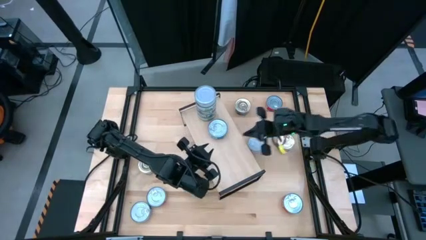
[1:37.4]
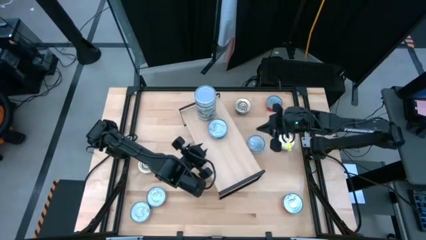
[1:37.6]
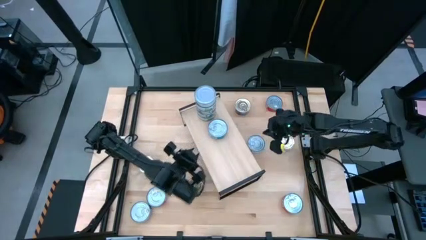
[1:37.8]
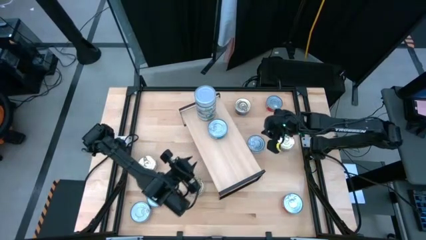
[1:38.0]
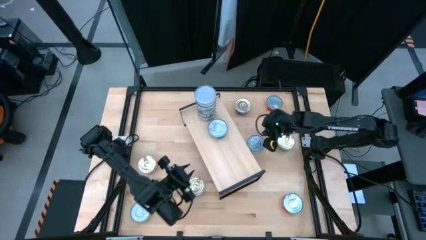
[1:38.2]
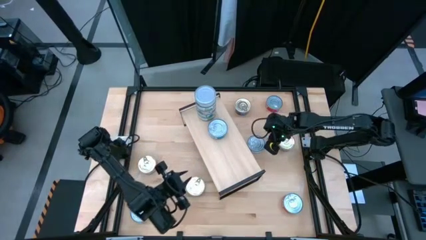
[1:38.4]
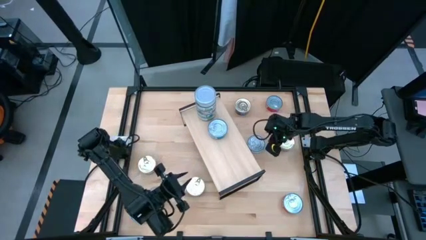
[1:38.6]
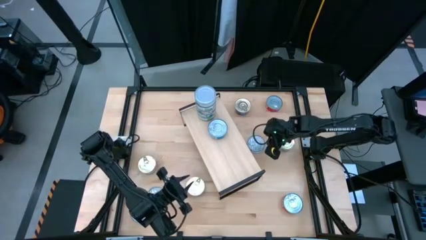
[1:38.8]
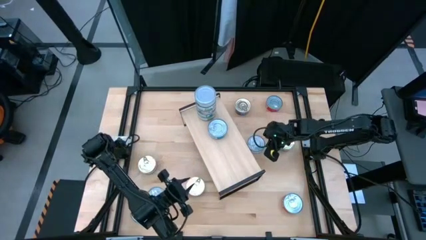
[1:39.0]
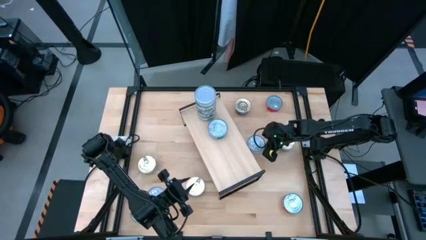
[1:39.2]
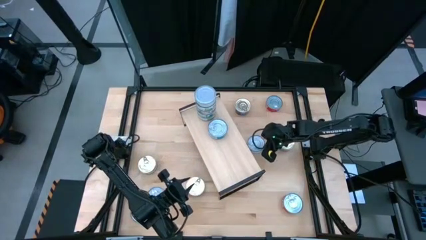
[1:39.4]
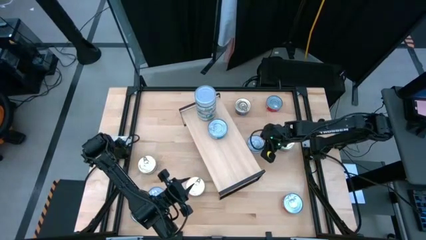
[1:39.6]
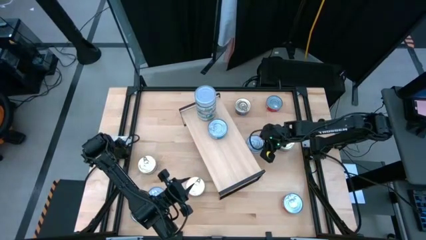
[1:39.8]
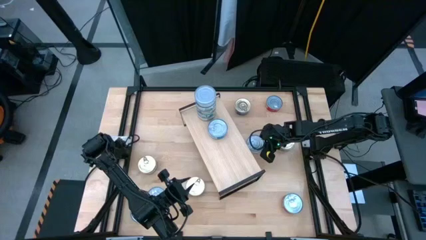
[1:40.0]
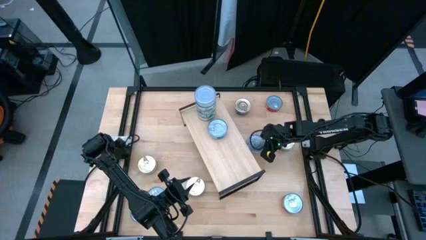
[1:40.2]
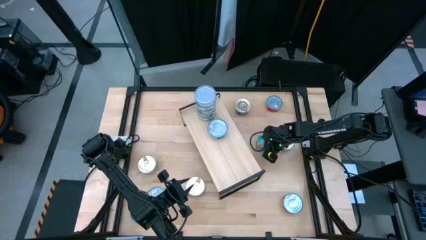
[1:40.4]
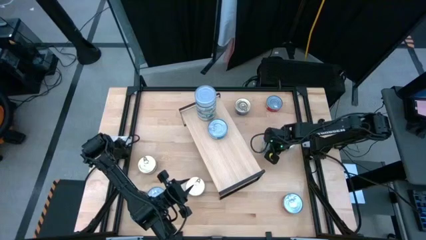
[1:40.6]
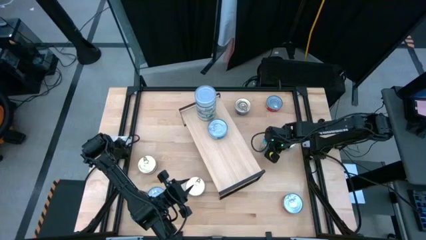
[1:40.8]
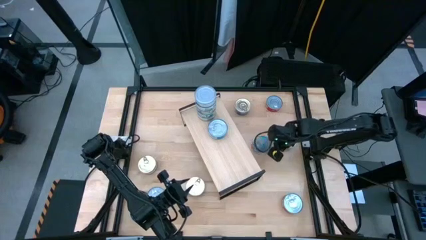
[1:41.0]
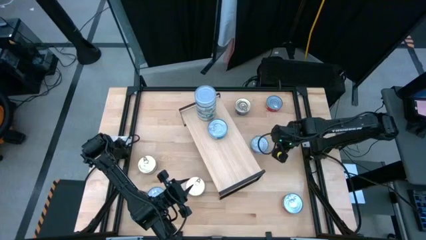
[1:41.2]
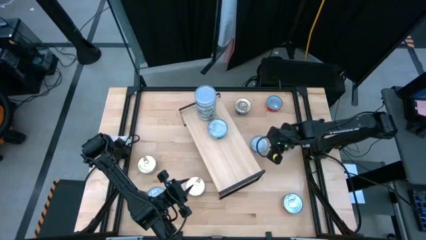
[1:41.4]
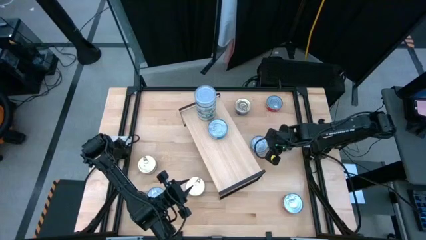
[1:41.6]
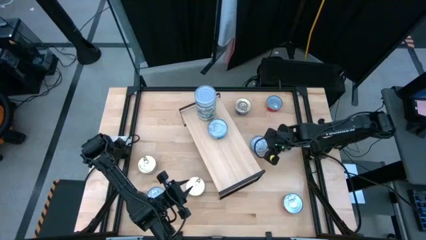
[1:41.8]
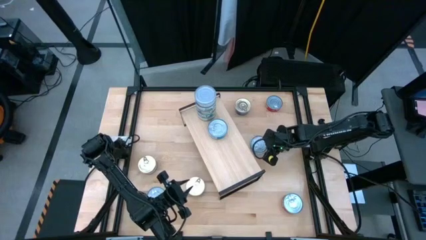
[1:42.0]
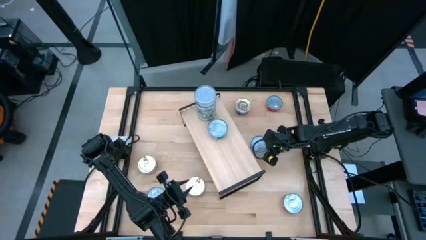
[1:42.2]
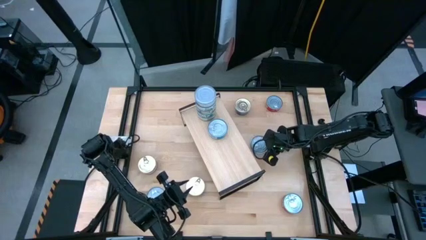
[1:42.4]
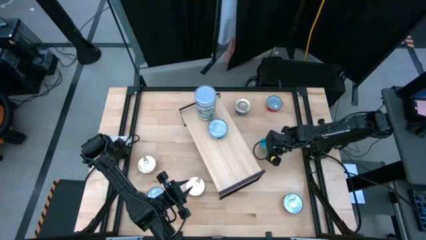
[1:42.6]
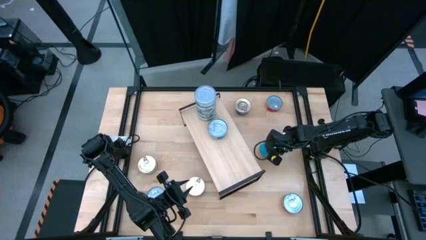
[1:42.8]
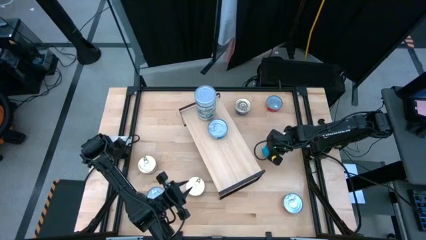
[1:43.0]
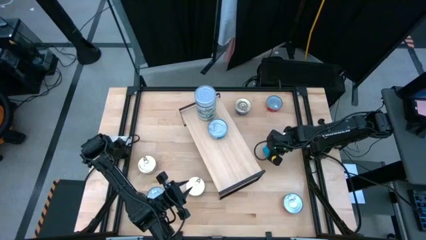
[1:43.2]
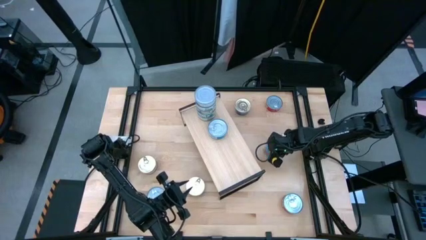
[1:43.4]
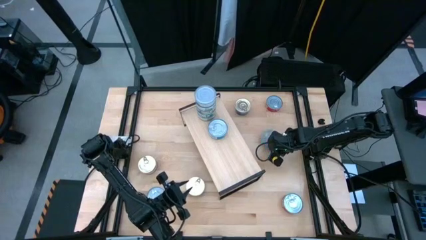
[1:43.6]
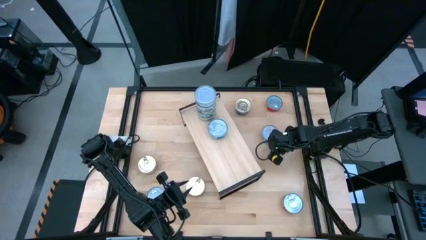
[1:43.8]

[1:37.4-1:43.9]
Task: Stack canned seafood by type on shelf
Stack the top right light blue tuna can on top of the other light blue tuna can the shelf

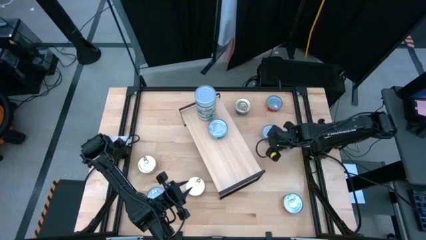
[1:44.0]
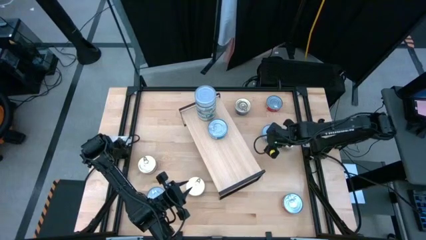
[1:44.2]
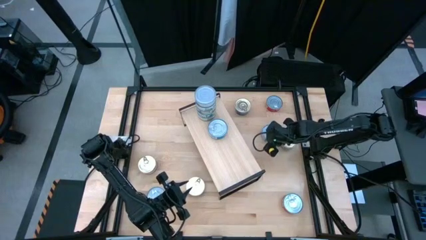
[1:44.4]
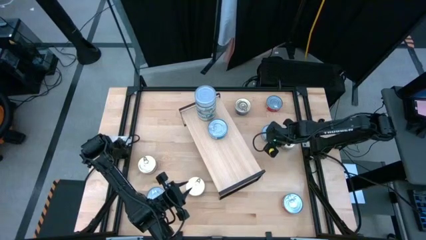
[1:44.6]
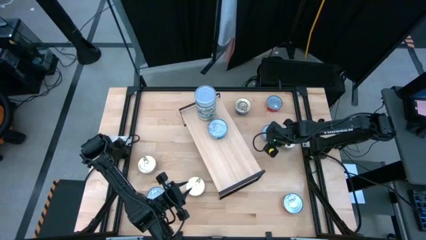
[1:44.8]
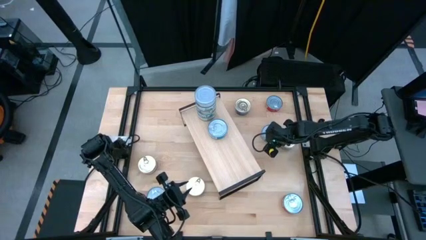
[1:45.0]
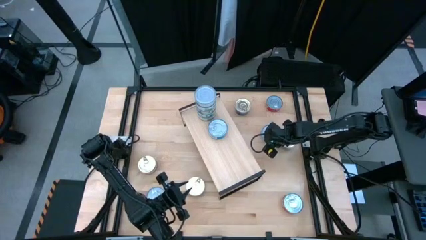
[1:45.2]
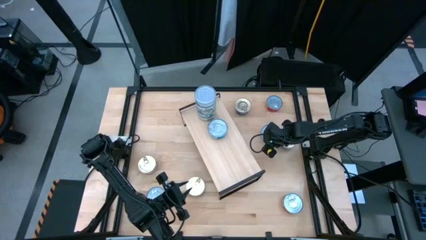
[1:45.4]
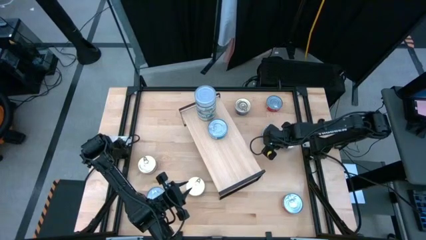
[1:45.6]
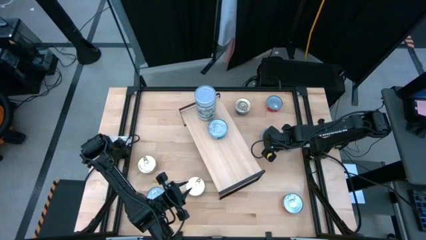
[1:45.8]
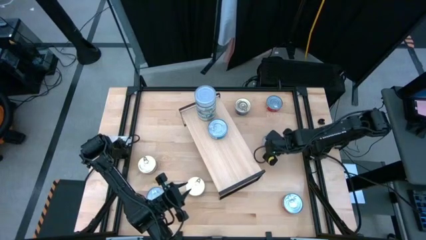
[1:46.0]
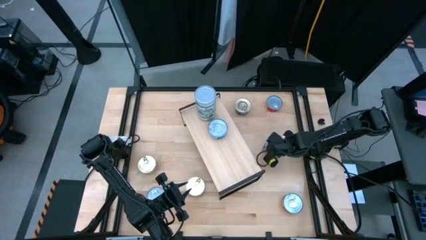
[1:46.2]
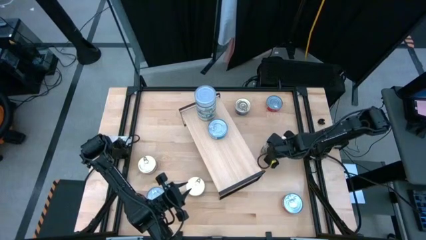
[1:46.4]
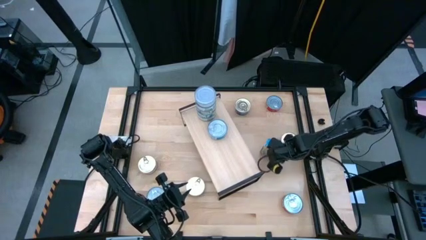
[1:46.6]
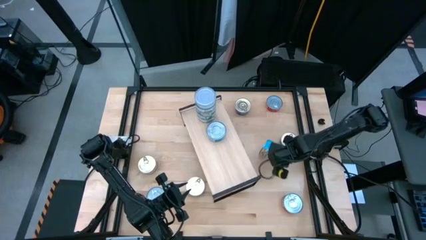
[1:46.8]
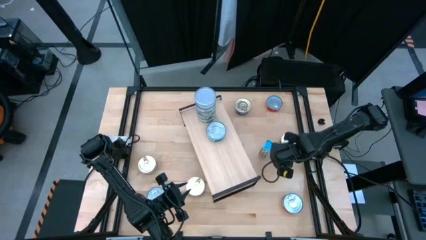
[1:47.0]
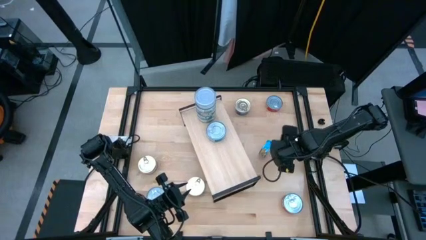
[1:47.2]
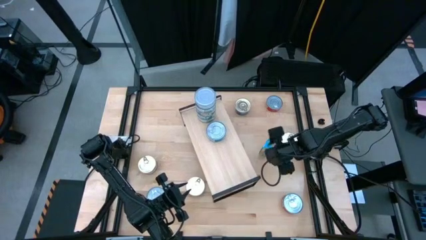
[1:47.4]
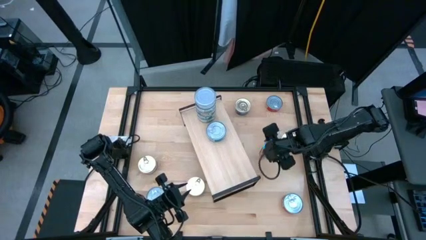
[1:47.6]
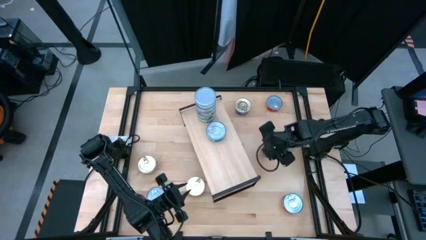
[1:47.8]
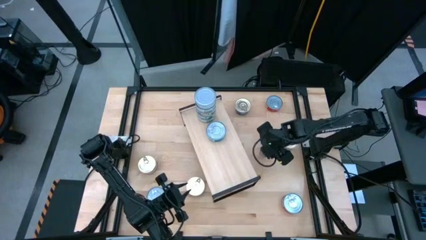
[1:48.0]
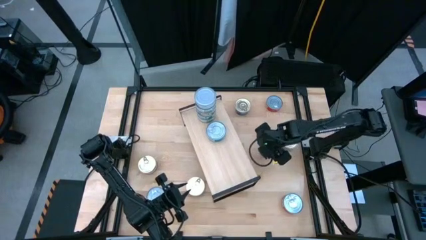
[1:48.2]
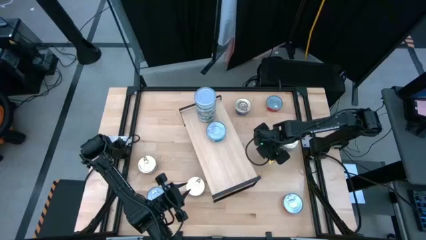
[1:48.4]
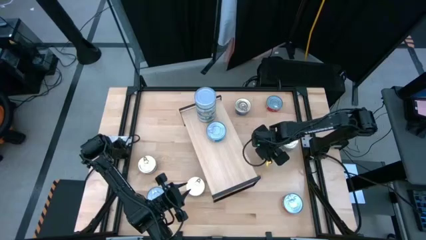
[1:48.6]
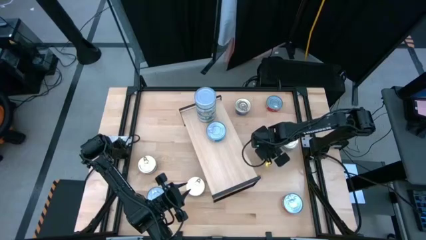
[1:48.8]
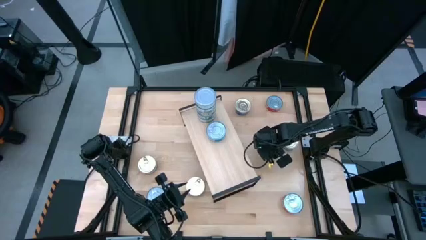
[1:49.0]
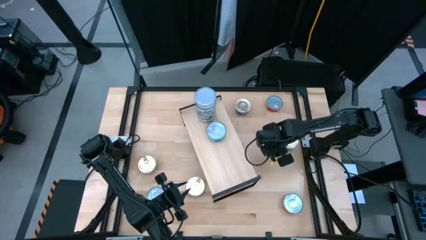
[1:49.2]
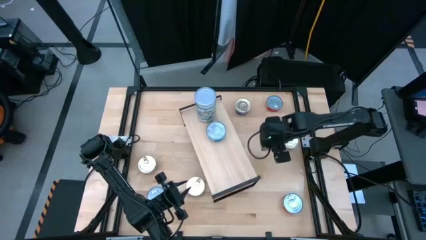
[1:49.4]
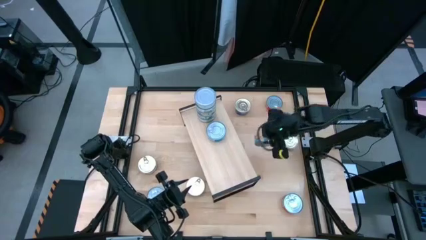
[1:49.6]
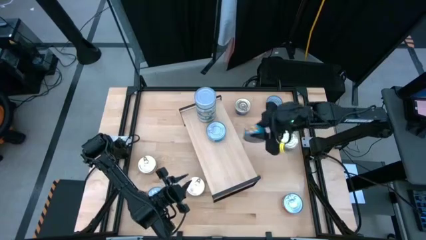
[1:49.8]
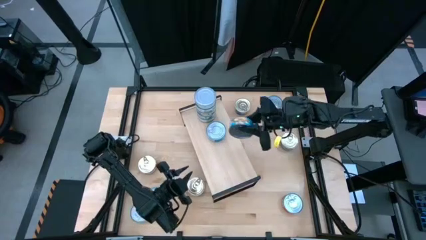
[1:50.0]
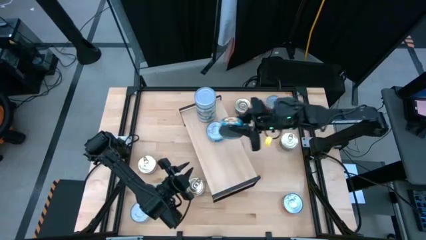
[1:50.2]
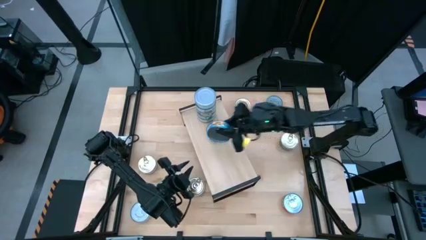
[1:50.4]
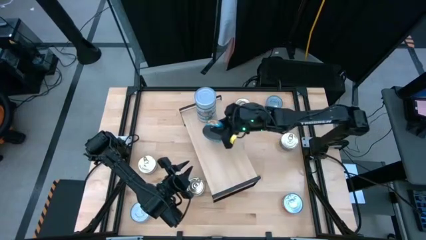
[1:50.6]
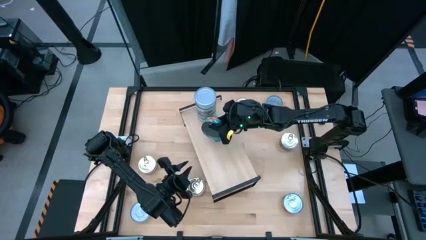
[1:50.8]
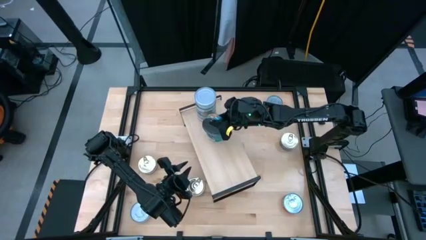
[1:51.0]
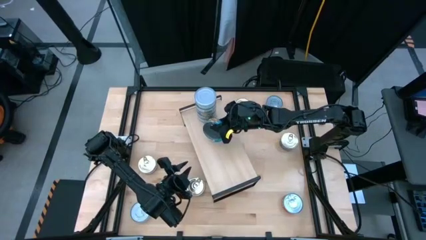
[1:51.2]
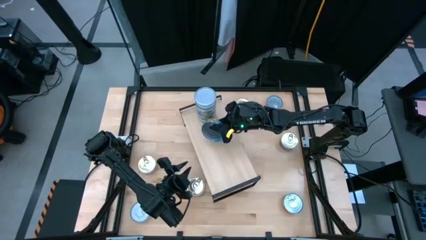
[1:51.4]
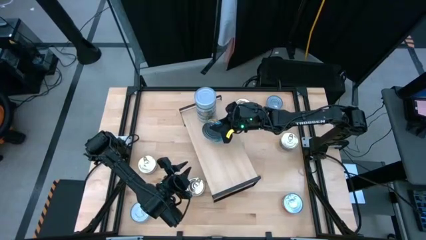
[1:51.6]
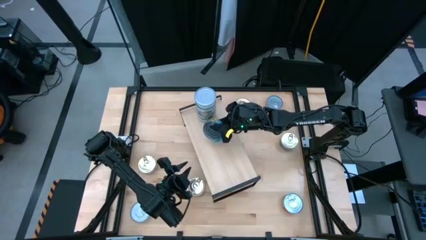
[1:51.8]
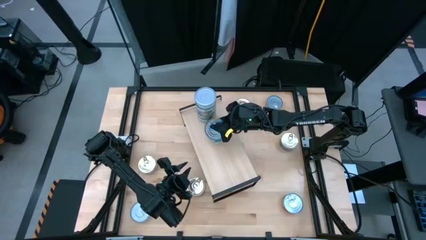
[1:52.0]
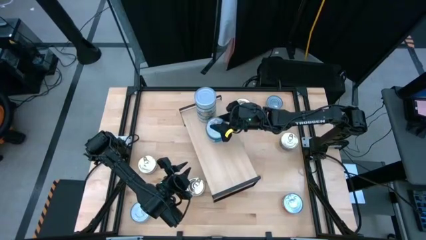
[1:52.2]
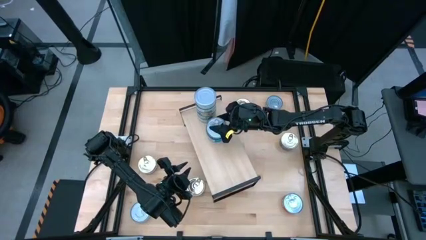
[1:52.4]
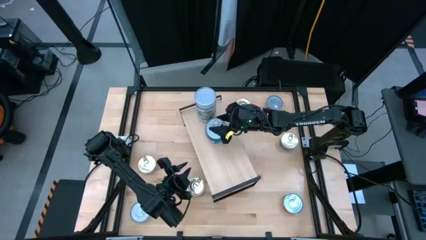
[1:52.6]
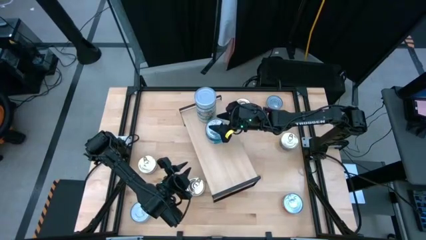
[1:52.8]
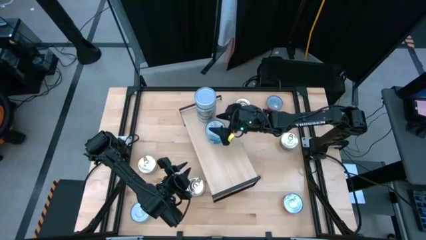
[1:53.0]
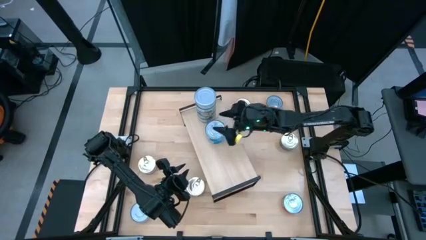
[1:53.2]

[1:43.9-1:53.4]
Stack the top right light blue tuna can on top of the other light blue tuna can the shelf
